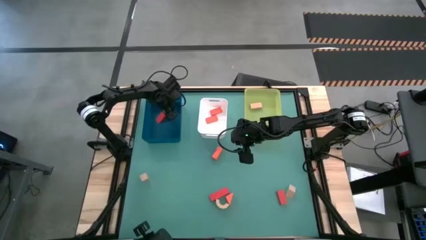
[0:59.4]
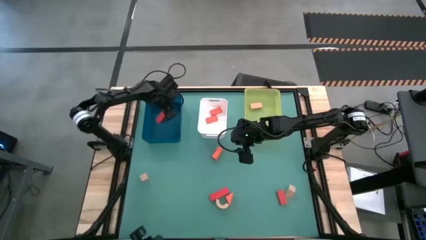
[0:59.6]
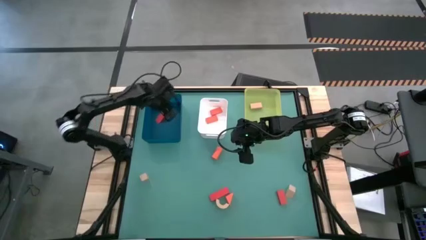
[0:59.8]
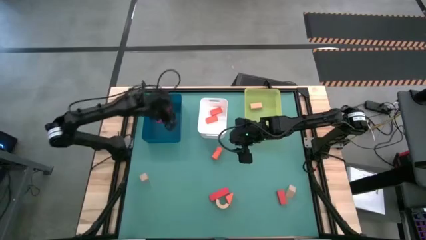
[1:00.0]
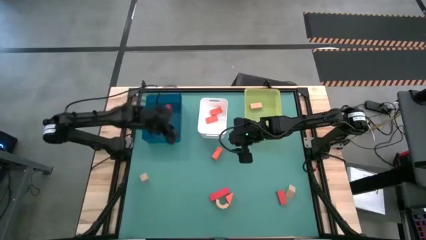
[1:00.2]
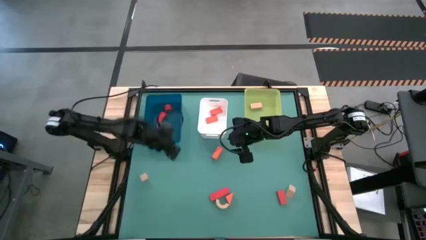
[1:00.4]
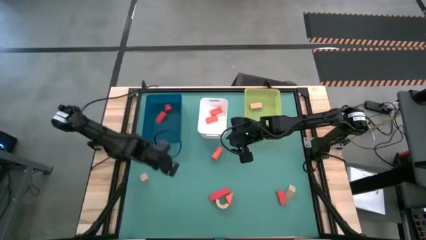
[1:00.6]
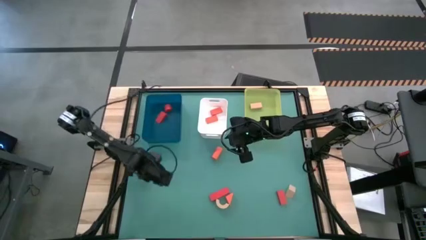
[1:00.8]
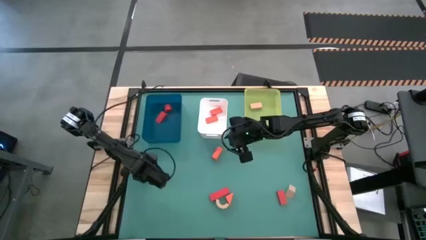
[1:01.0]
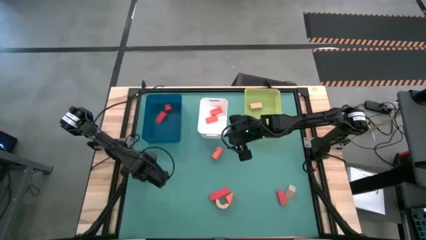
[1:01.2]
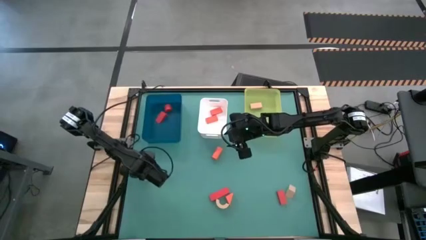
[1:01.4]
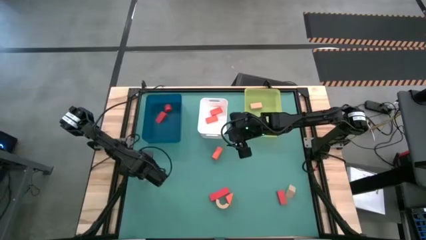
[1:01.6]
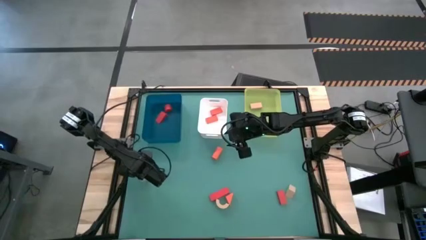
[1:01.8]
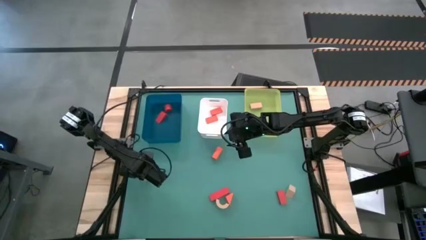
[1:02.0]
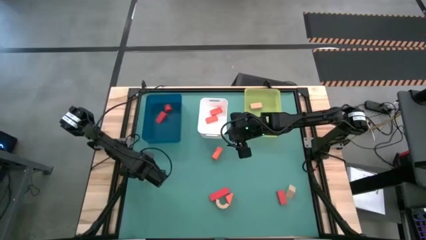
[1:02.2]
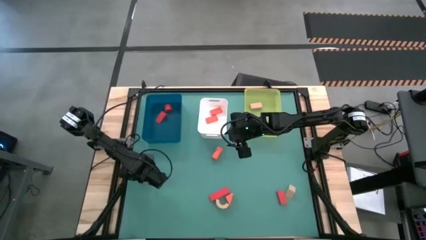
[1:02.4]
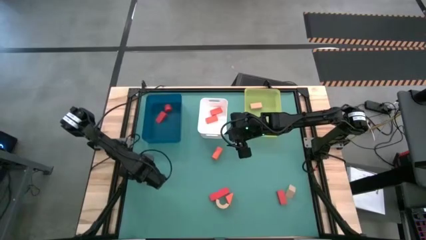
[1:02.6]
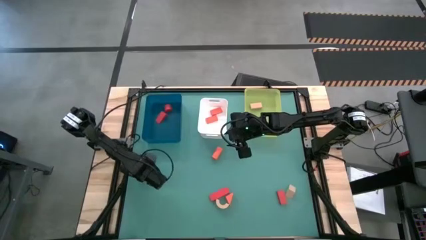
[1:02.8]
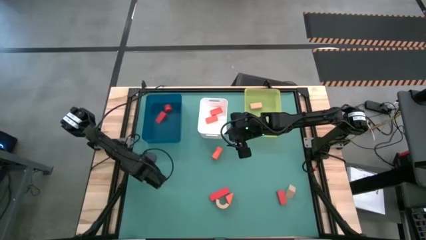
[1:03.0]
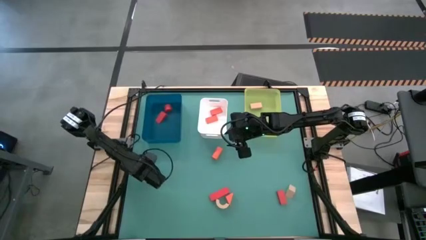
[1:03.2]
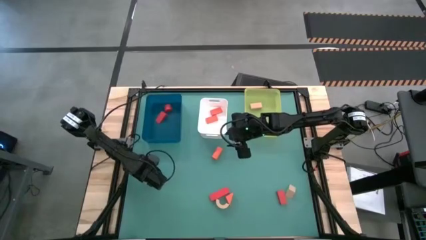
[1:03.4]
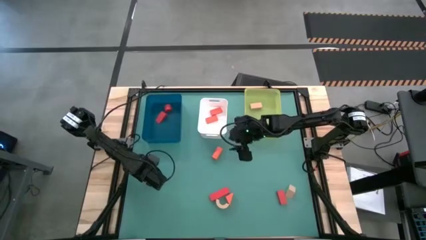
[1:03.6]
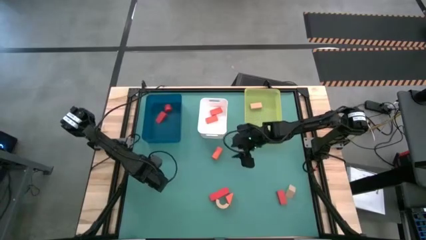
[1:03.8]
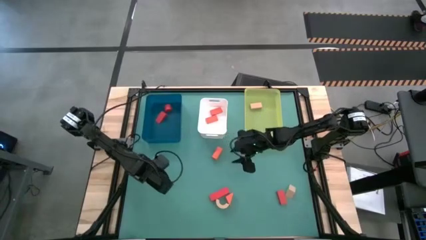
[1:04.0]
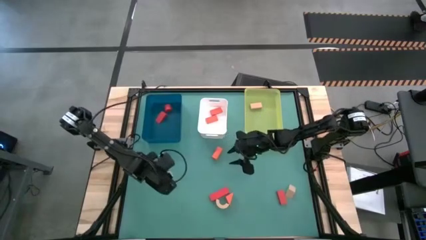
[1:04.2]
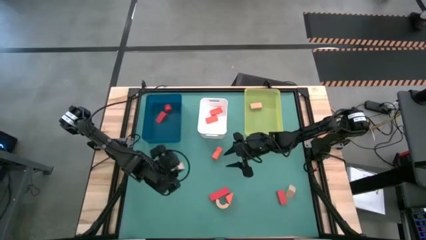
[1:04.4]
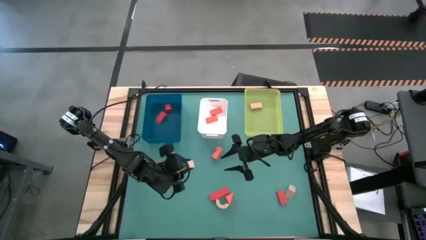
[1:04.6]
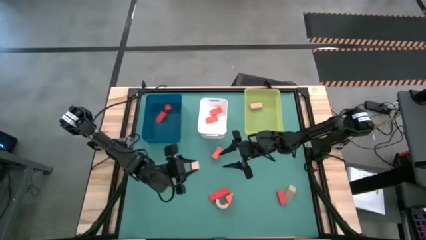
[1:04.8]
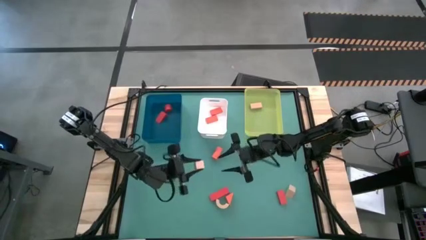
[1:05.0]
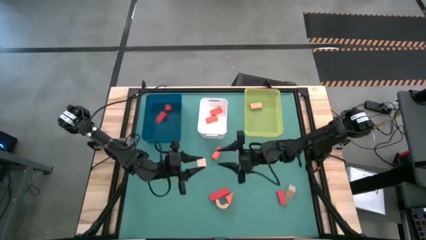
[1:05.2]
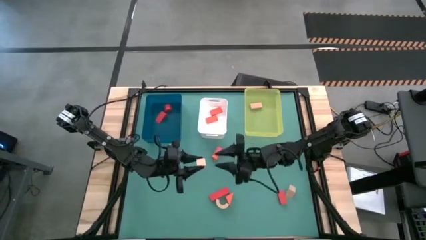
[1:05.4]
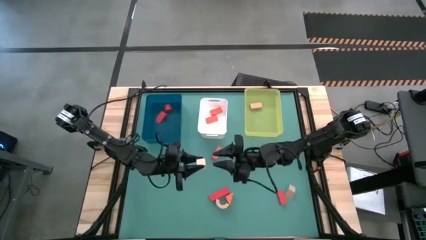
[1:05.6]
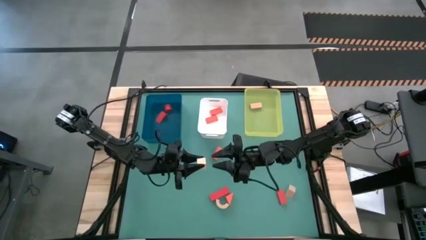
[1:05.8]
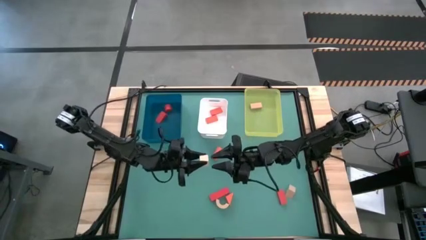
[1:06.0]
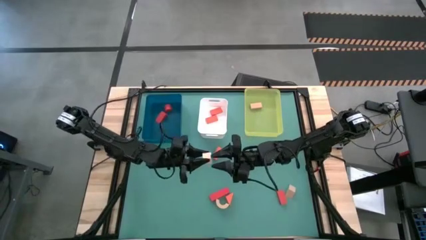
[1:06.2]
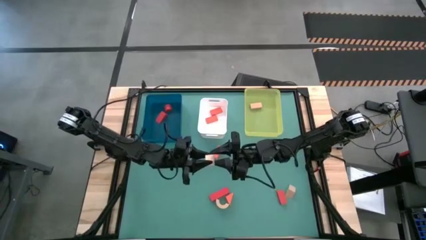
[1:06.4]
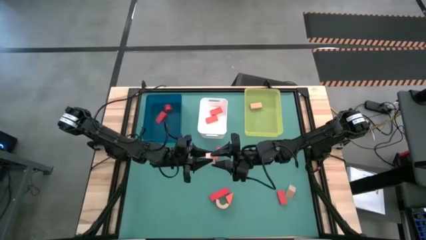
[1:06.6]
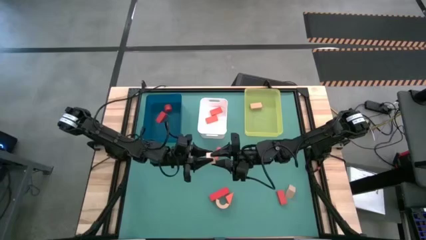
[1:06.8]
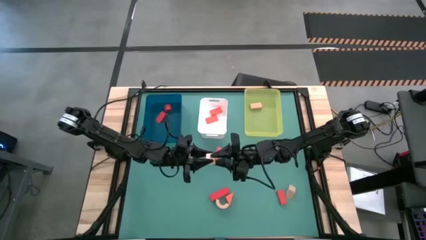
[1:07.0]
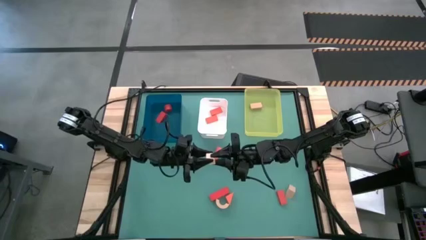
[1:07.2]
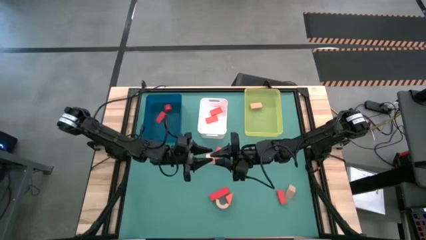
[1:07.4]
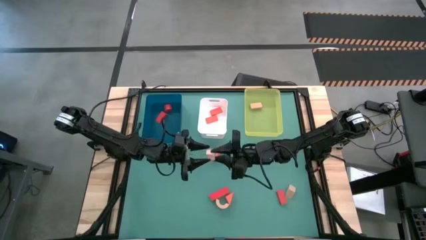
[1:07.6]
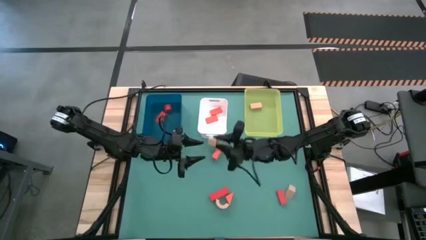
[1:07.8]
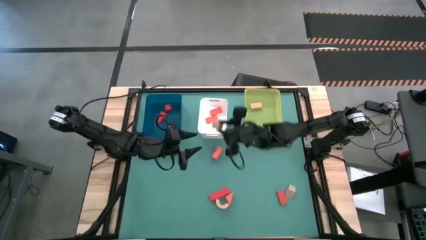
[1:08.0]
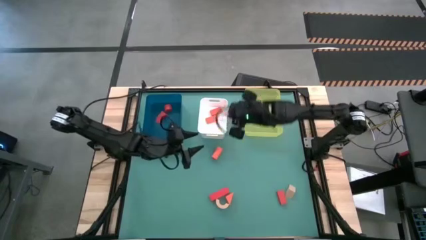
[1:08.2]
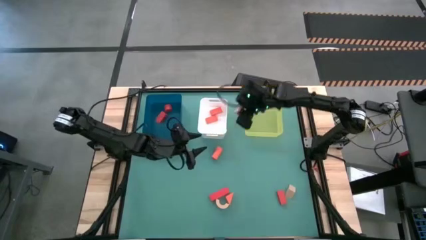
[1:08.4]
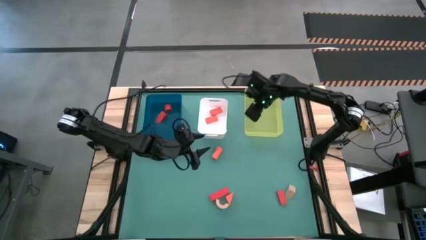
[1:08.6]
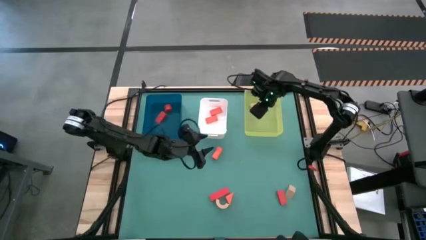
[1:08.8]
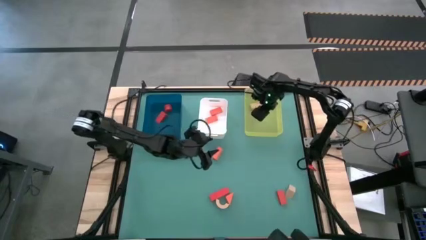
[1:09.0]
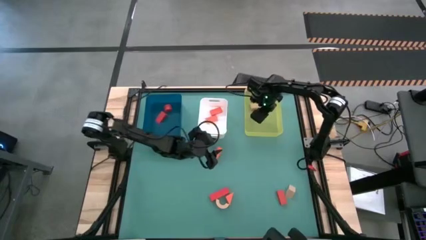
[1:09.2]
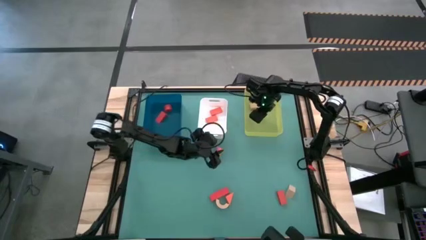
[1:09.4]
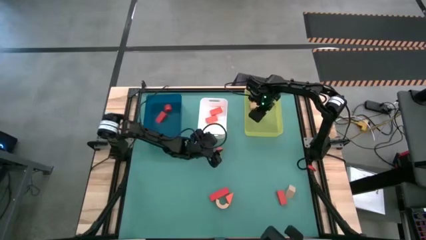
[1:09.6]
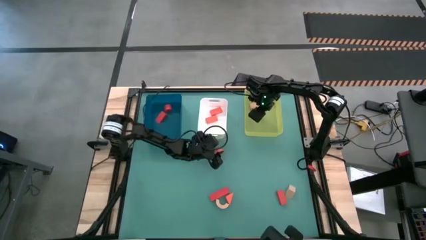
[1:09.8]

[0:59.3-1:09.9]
Task: Sort & place blocks by color
Put the left light brown block into the yellow bin

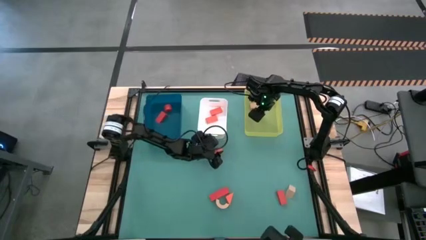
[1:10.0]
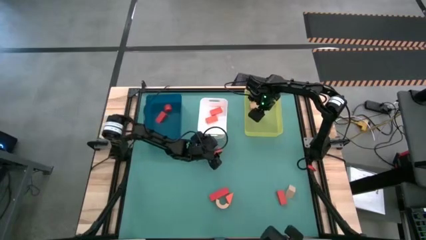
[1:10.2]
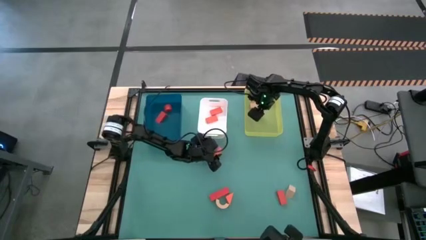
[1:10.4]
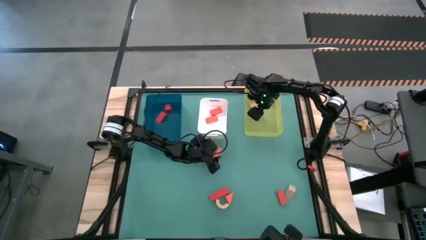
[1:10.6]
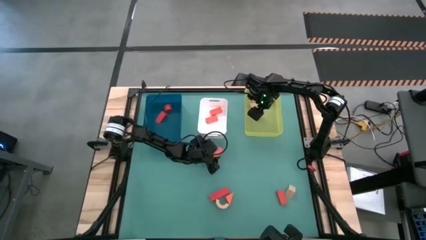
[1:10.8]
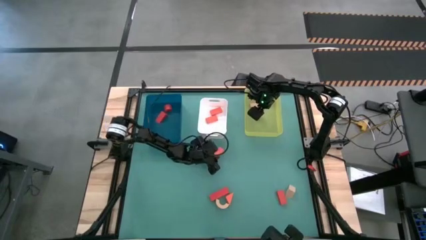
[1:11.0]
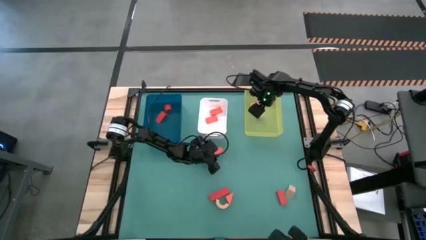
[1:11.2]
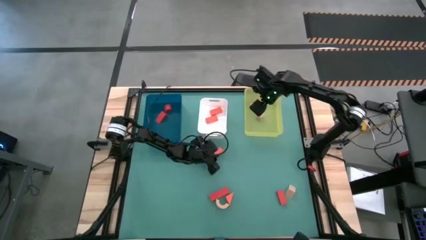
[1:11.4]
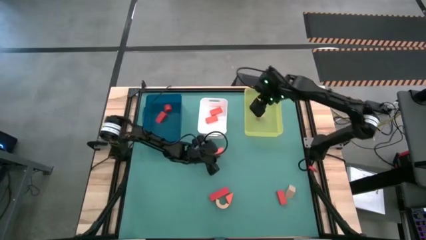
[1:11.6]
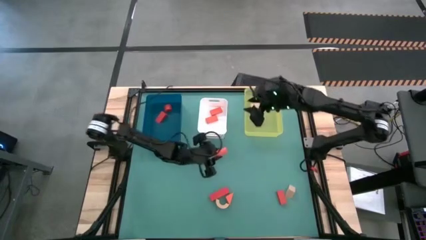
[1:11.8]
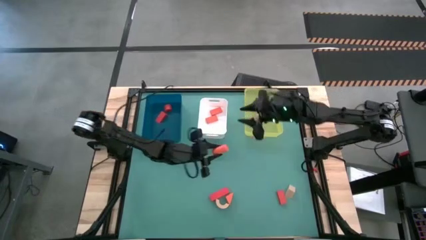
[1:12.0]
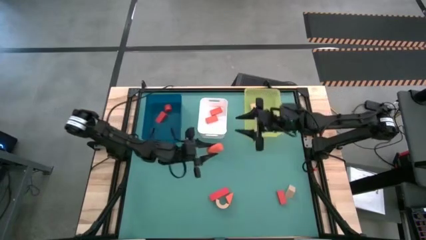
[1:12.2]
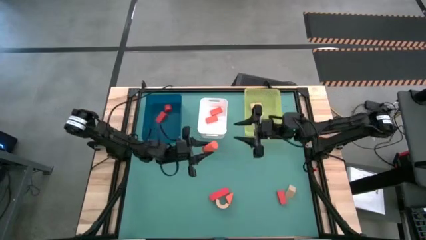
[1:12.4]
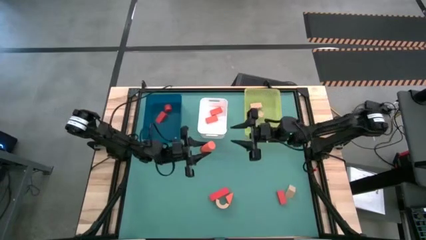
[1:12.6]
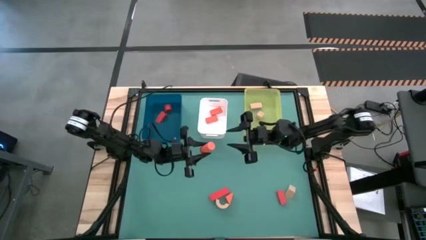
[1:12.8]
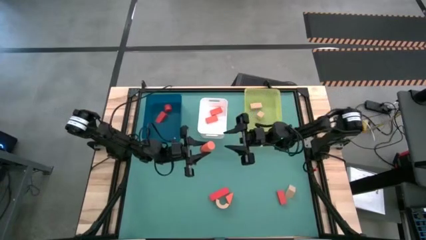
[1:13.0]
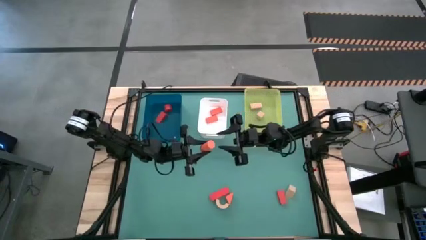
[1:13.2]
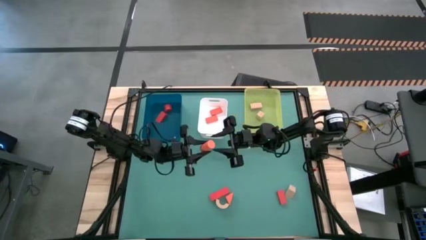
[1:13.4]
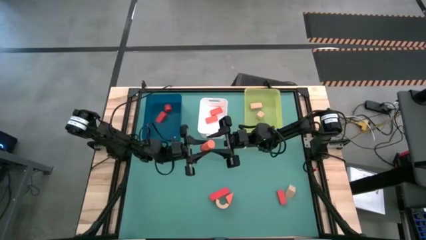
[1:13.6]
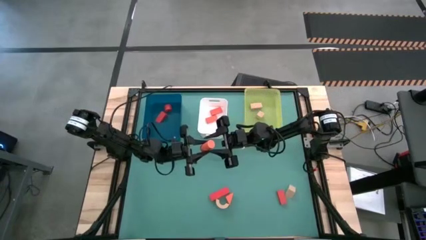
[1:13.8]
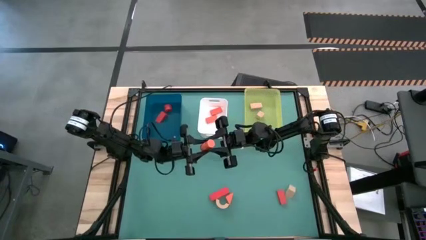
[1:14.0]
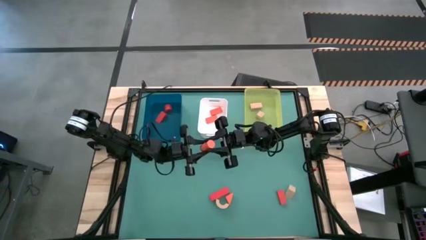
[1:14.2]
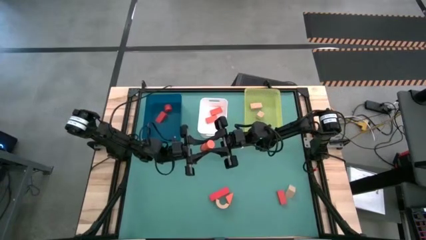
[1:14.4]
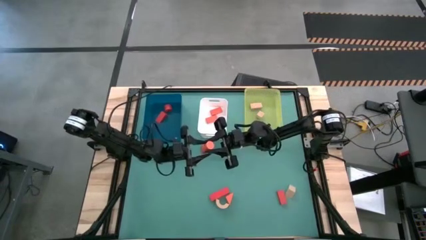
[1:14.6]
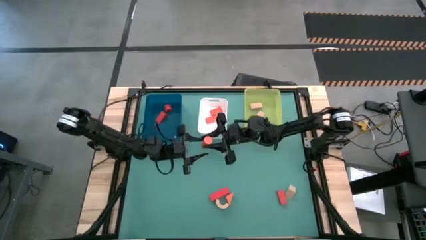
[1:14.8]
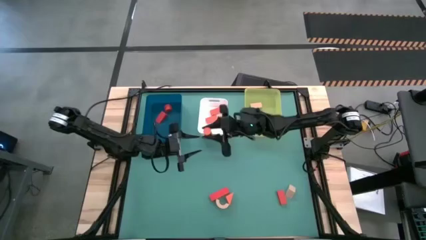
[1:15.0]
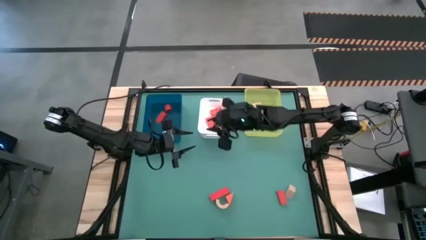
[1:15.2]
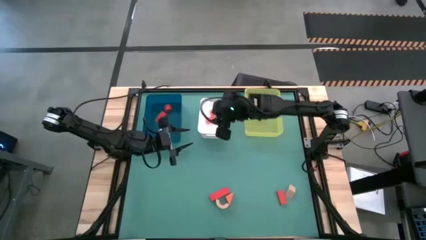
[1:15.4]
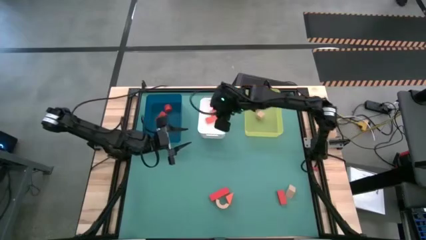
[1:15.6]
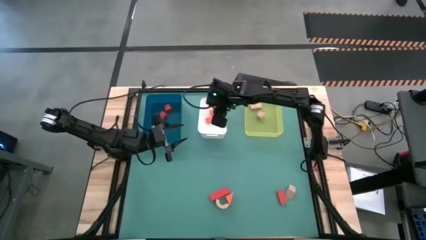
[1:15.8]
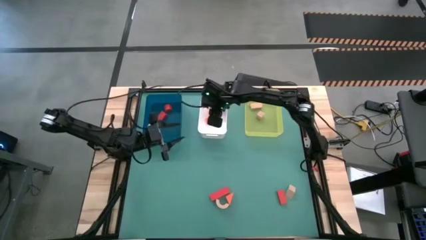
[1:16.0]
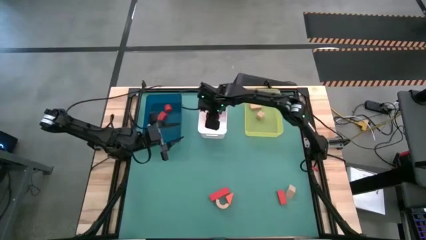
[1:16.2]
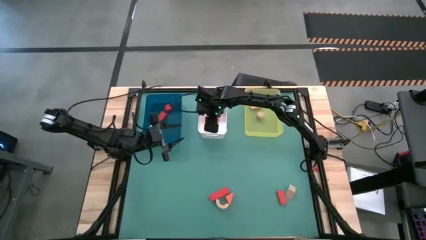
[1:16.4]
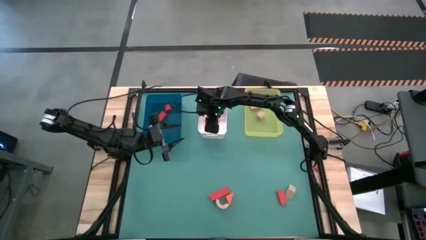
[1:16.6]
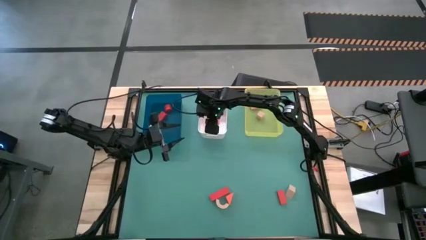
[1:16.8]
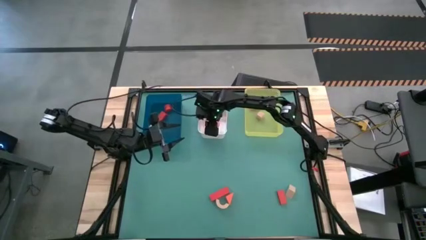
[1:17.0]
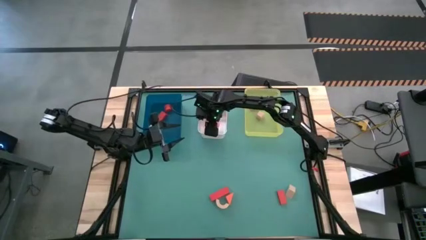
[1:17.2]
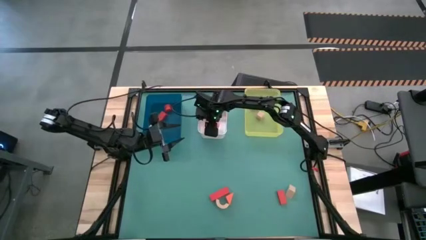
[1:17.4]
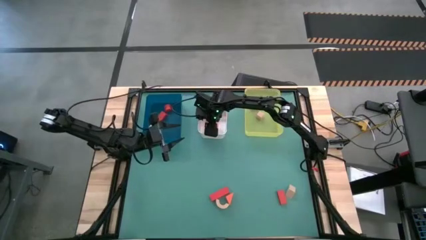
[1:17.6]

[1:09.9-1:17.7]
Put the top left orange block into the white bin
